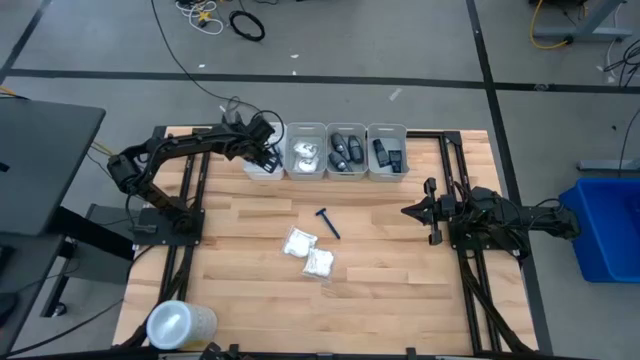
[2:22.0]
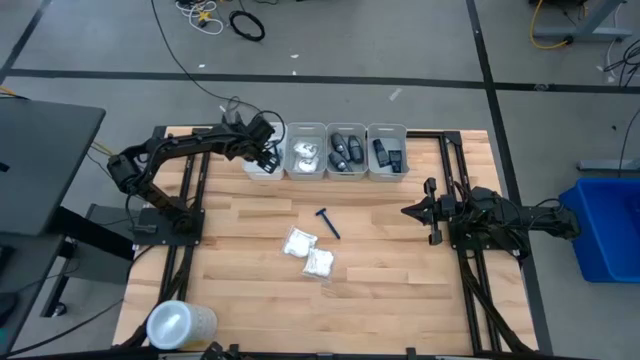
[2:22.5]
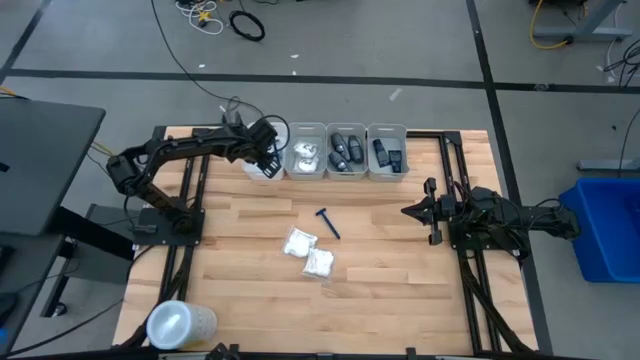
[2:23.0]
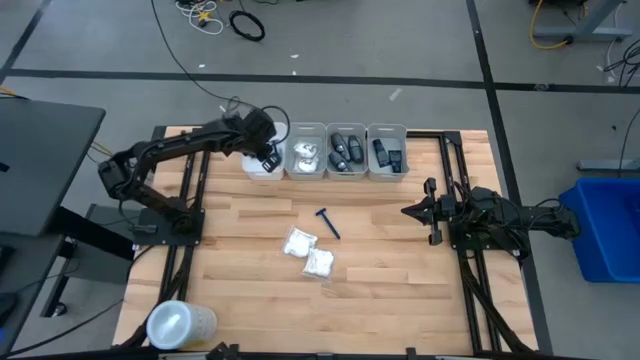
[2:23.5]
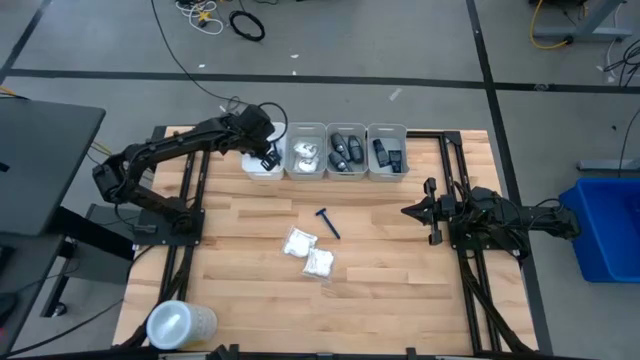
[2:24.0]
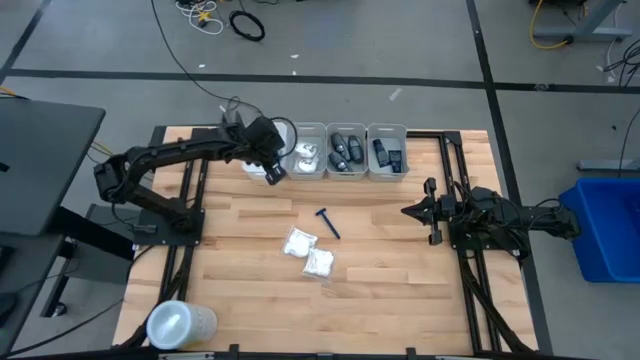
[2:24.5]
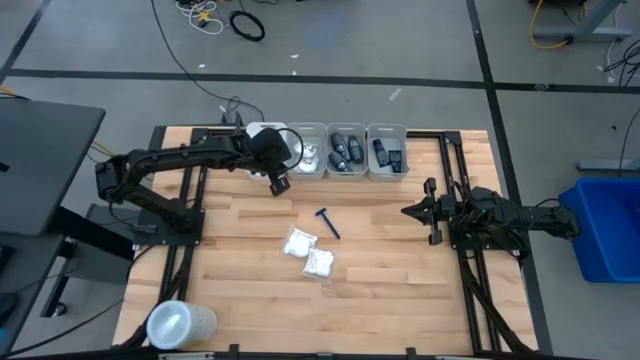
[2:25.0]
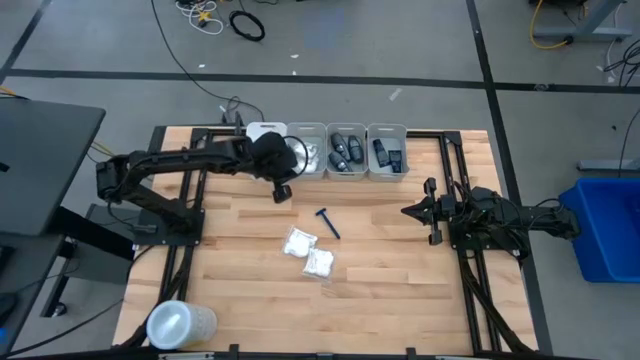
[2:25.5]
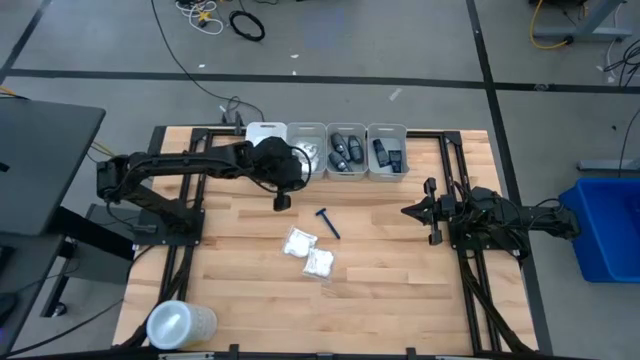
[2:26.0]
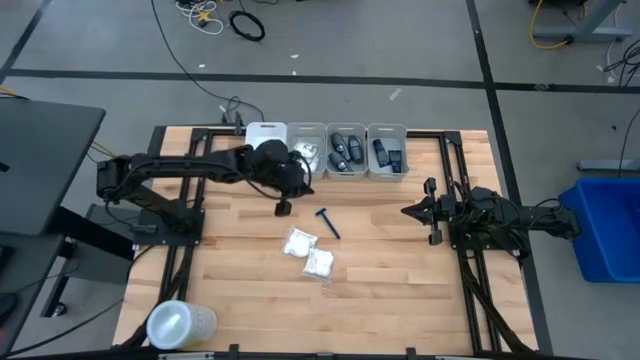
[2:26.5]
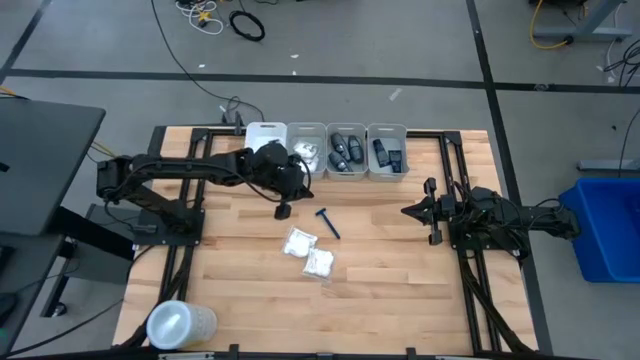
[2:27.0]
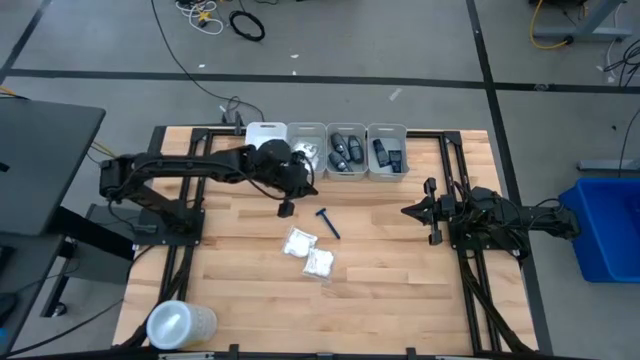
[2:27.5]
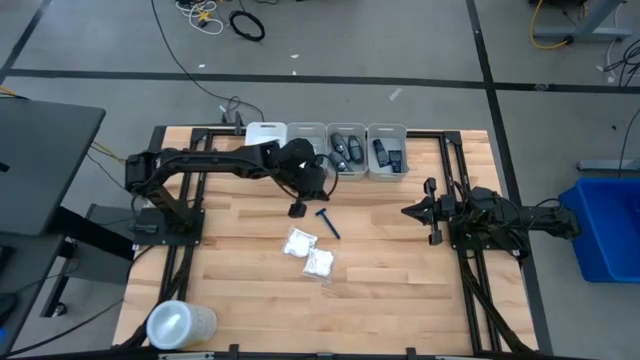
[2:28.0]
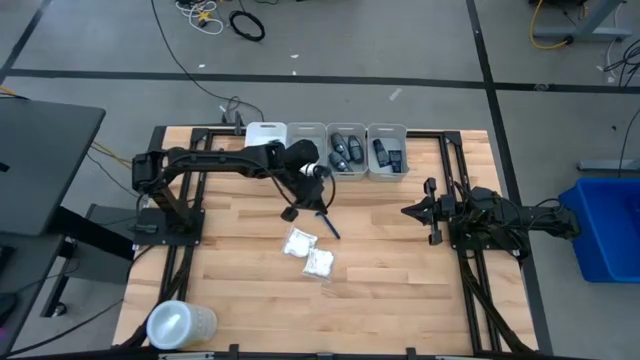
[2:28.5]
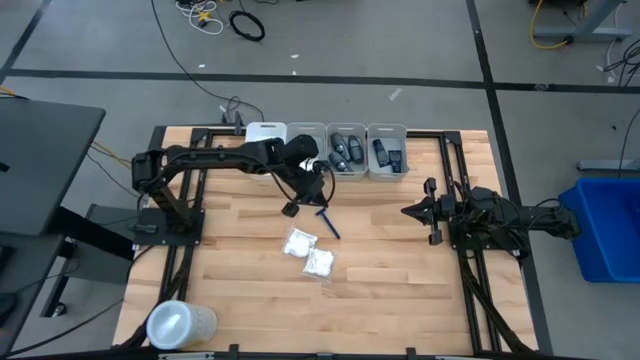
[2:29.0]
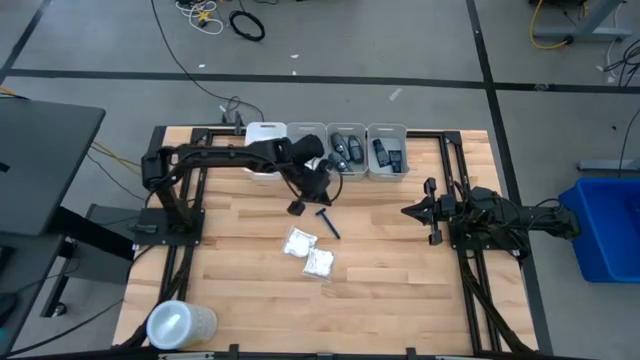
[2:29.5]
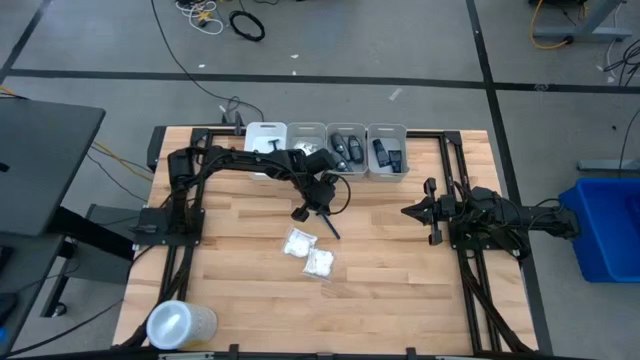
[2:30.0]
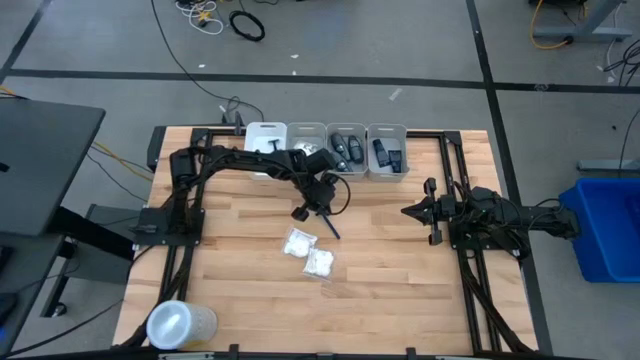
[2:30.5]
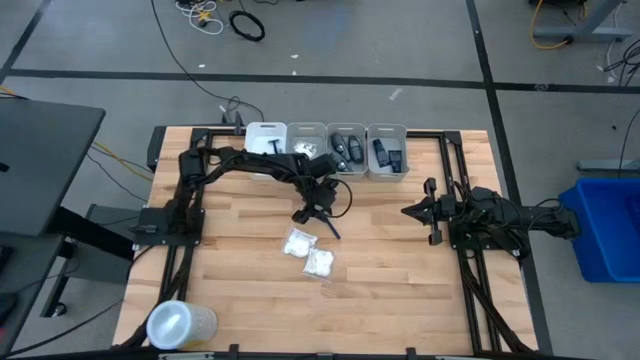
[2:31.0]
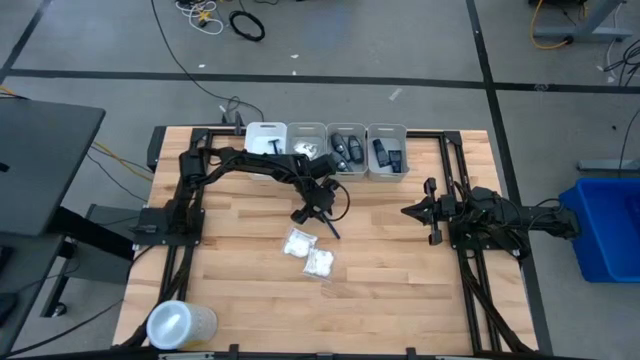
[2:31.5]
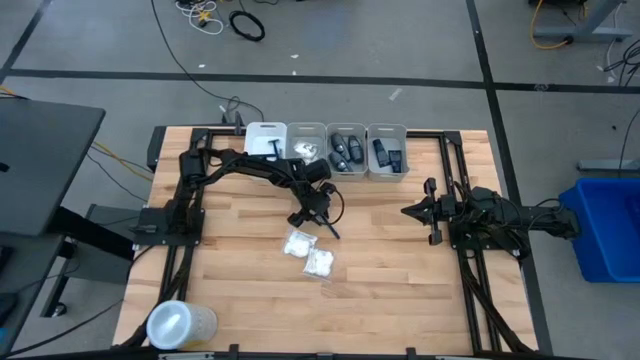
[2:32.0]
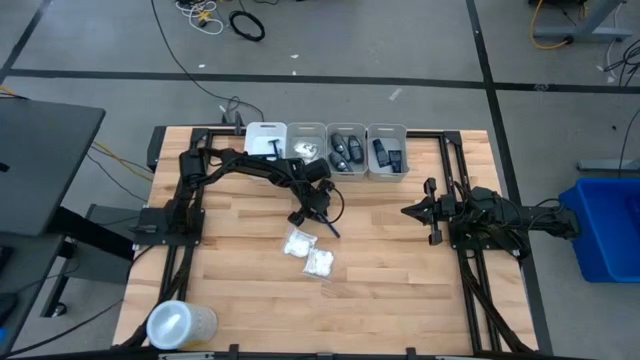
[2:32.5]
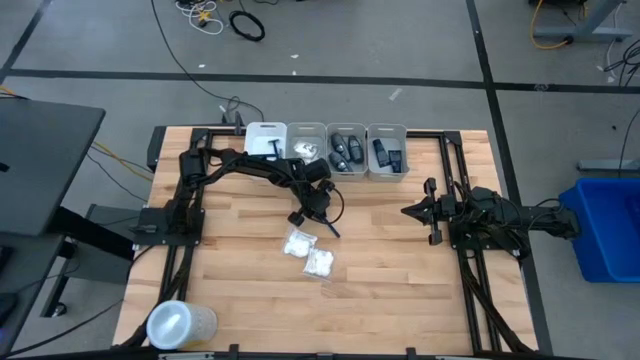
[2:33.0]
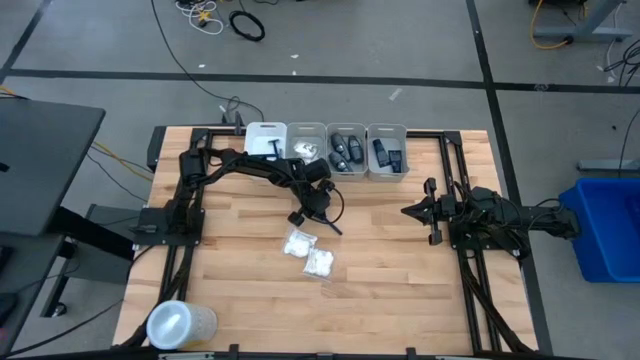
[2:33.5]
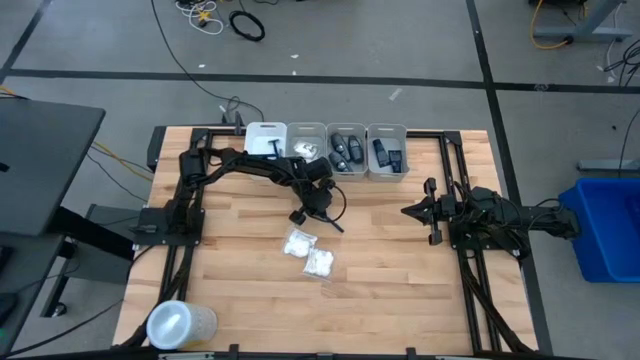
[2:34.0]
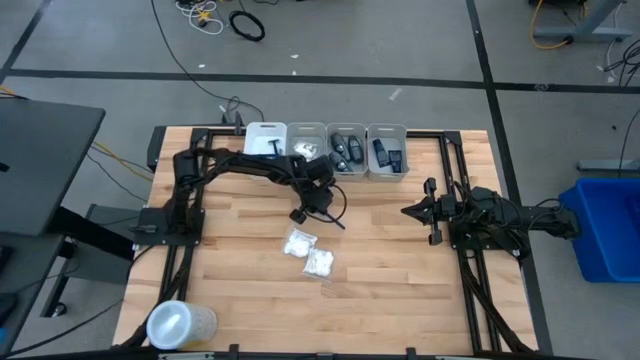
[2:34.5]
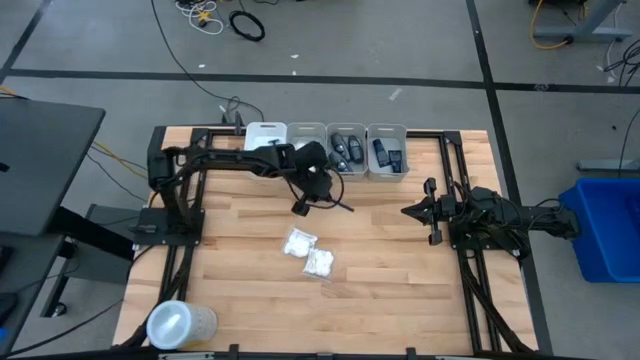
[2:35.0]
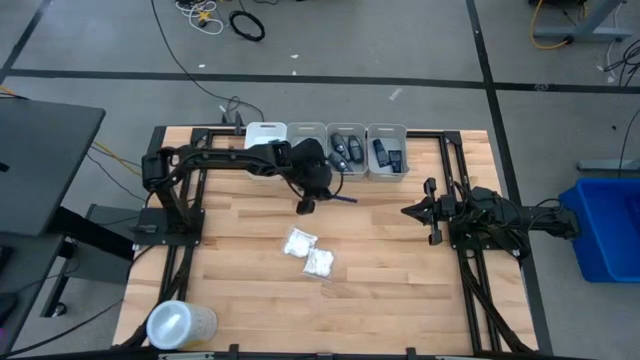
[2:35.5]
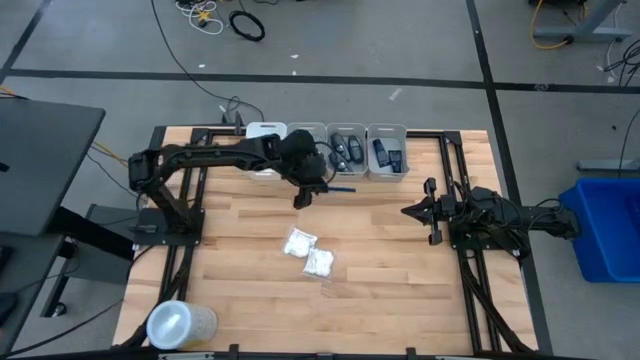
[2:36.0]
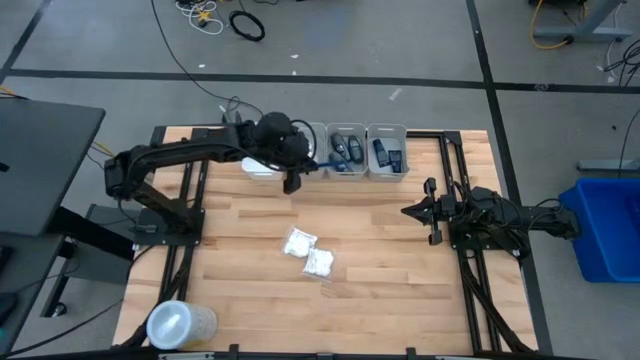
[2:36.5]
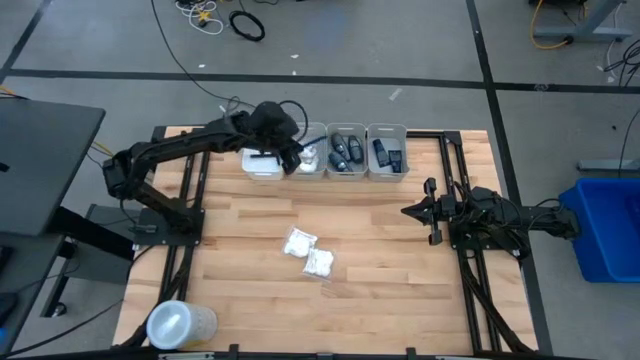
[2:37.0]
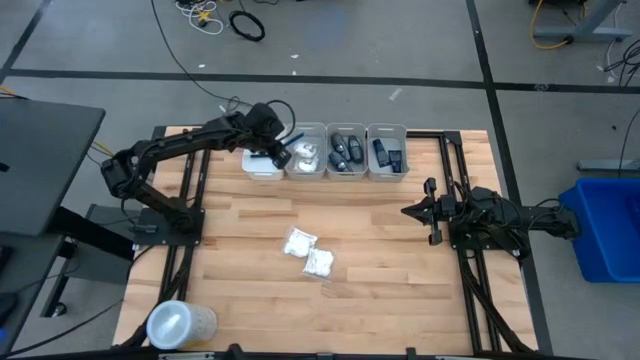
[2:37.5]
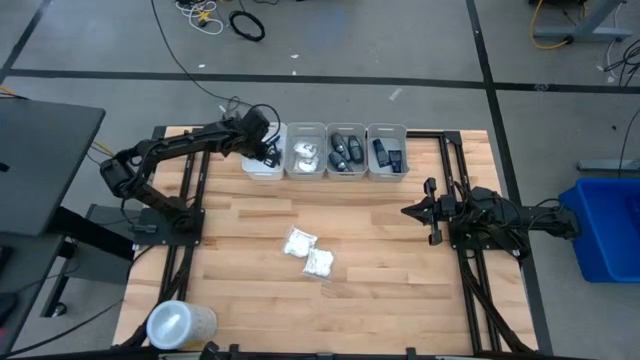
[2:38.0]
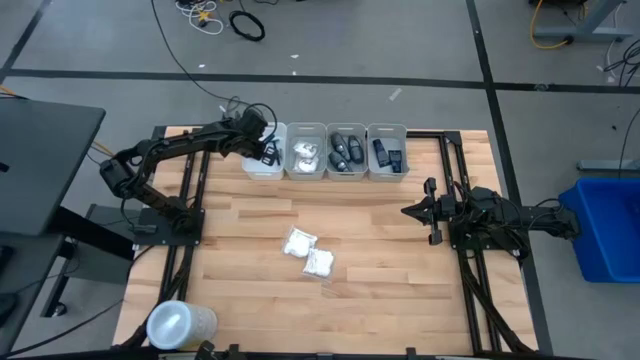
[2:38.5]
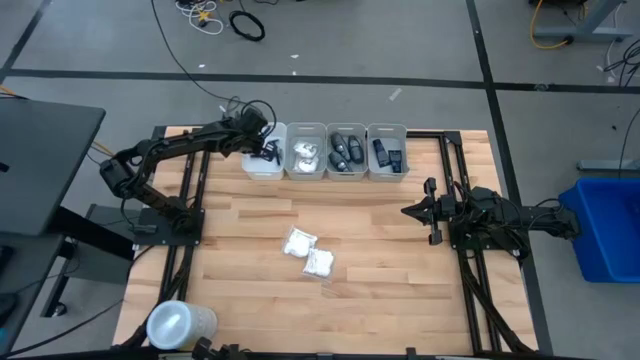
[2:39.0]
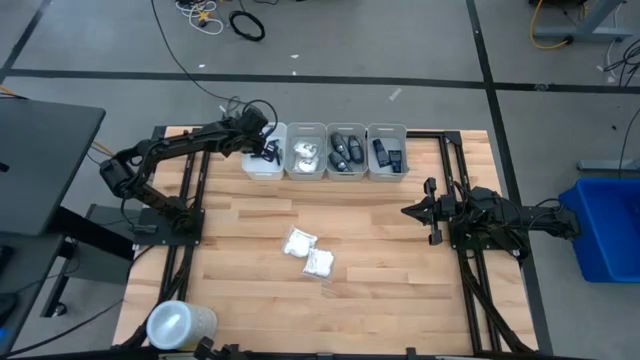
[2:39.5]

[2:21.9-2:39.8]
Task: Pick & Place Travel size toiletries
Put the blue razor into the white bin

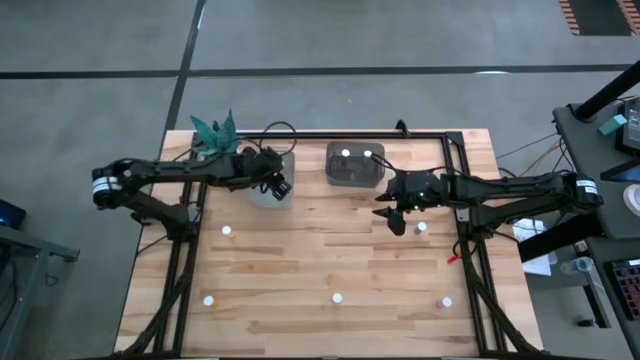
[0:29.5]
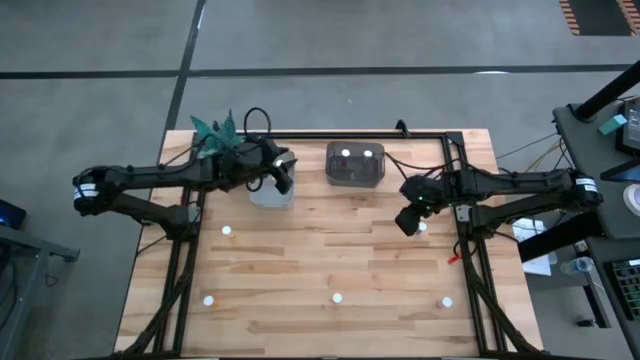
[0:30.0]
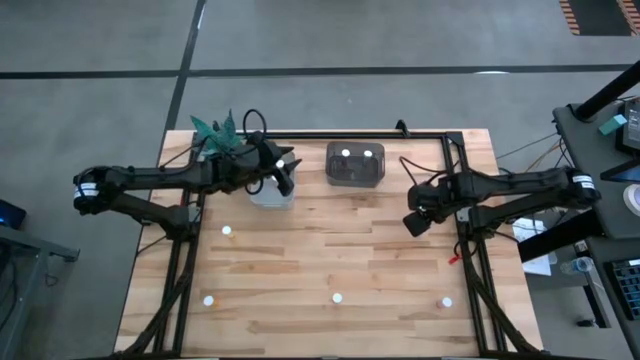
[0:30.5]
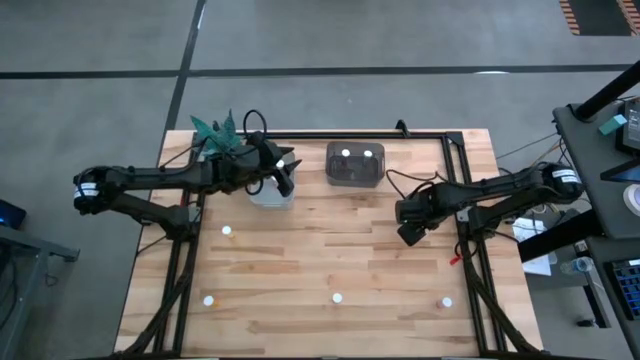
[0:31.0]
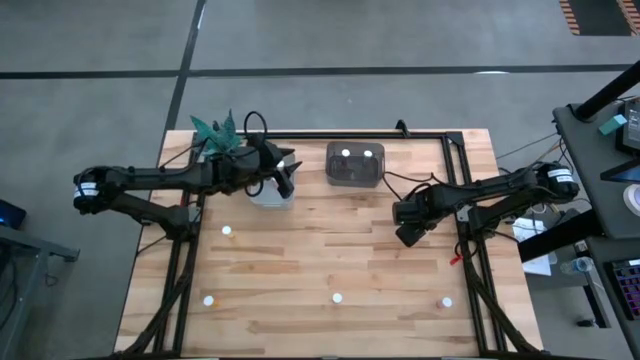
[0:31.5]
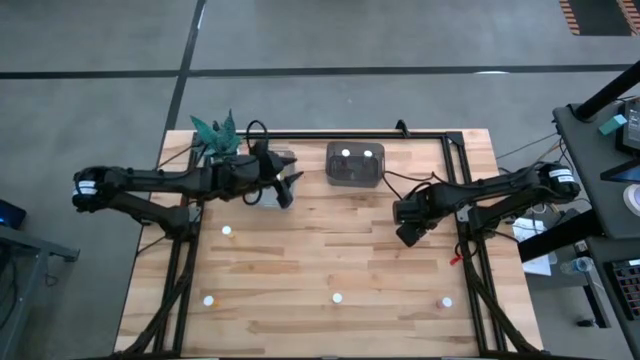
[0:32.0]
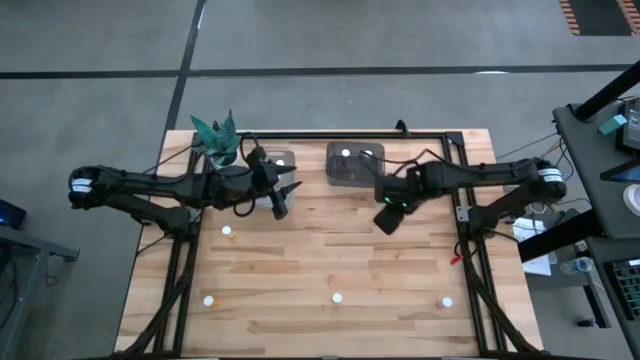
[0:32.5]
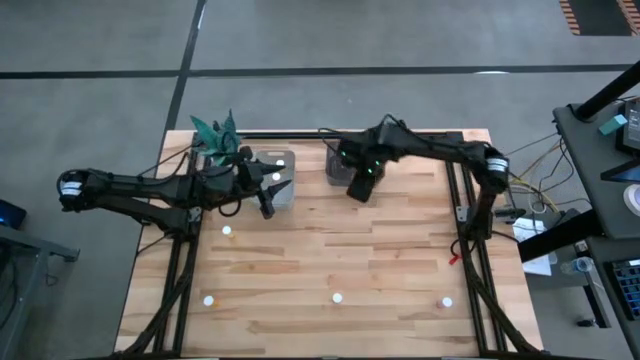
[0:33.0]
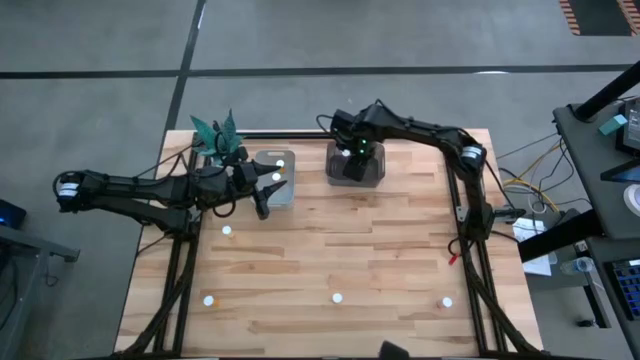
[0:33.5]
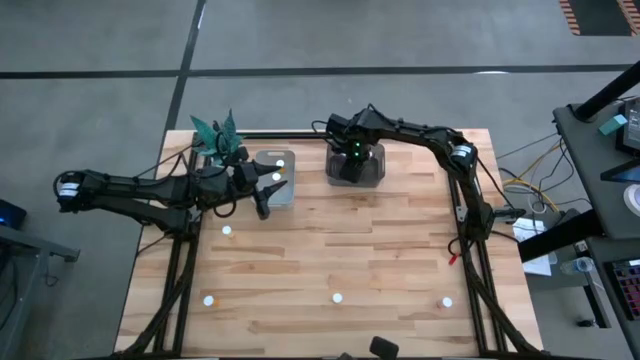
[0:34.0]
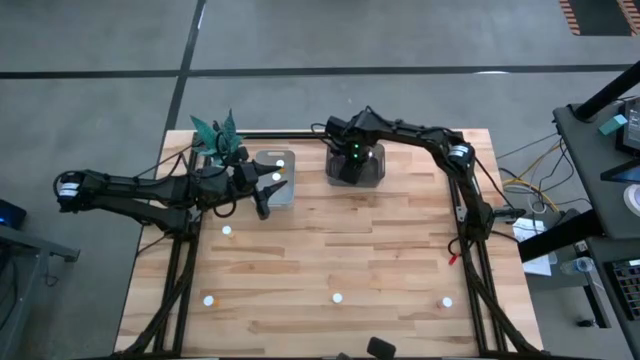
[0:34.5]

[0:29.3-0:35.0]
Task: Pick and place medicine bottles into bin by pill shape (circle, oval)
Put the blue capsule bottle into the black bin
